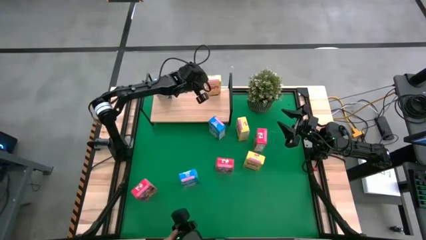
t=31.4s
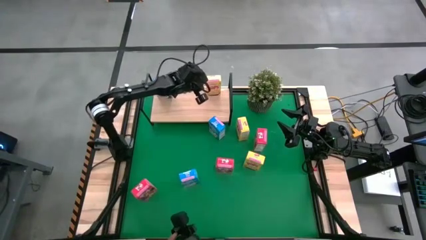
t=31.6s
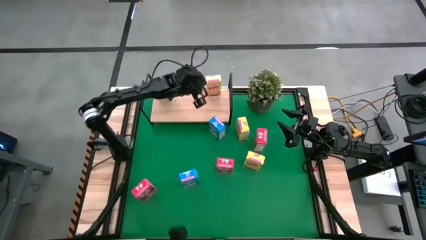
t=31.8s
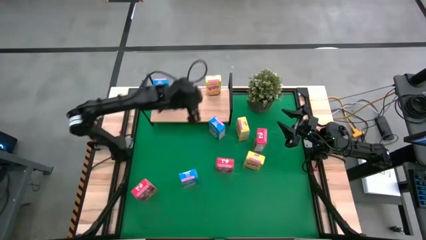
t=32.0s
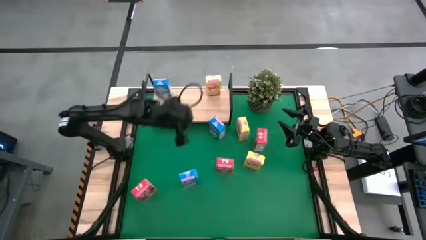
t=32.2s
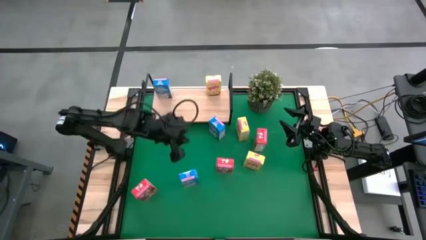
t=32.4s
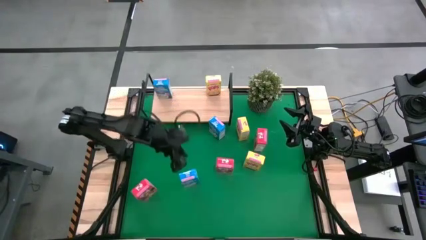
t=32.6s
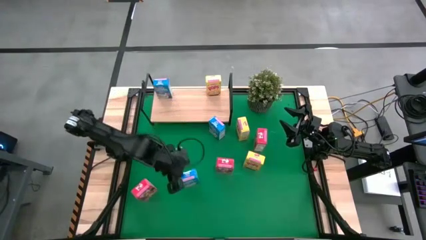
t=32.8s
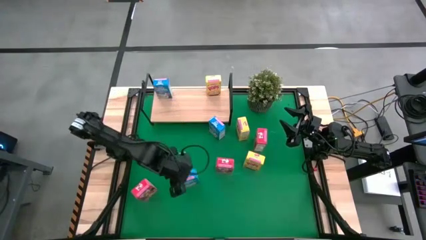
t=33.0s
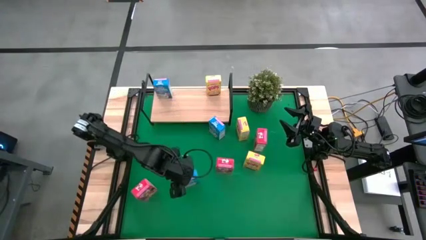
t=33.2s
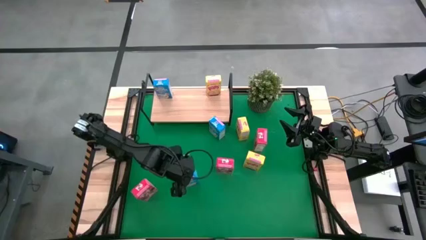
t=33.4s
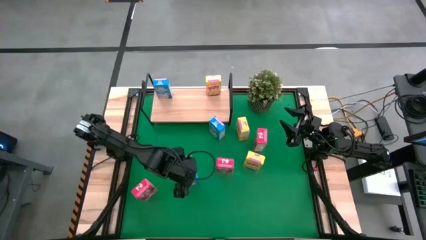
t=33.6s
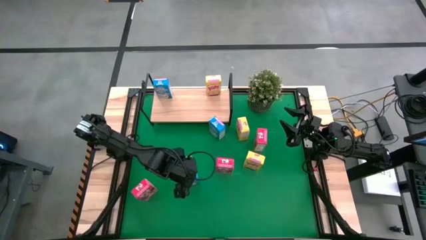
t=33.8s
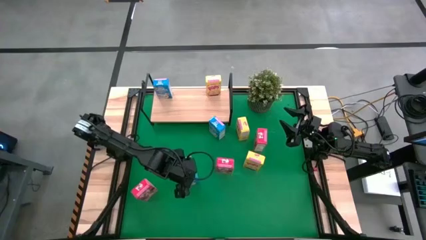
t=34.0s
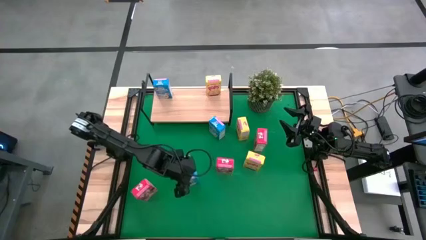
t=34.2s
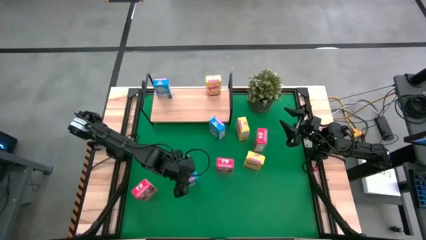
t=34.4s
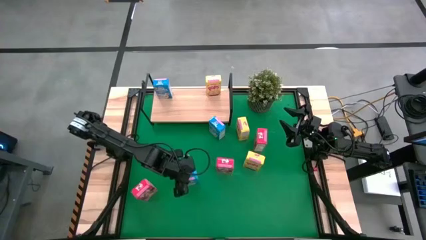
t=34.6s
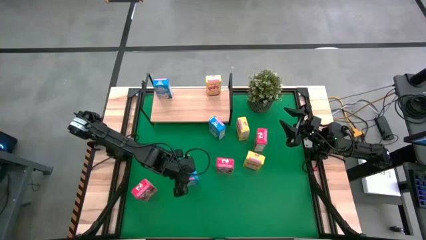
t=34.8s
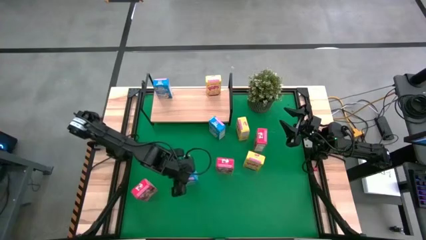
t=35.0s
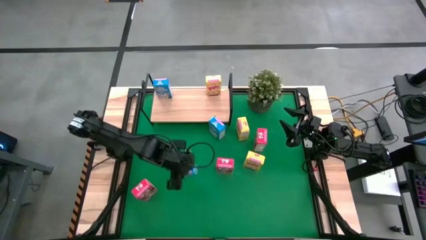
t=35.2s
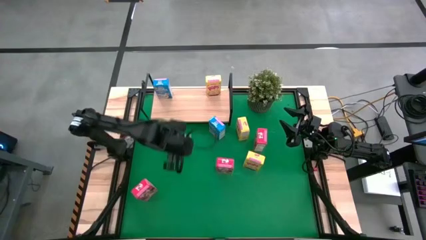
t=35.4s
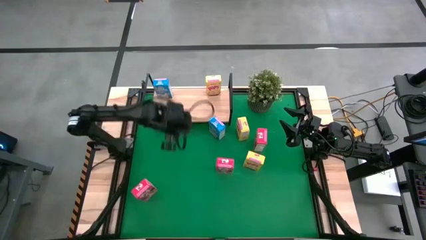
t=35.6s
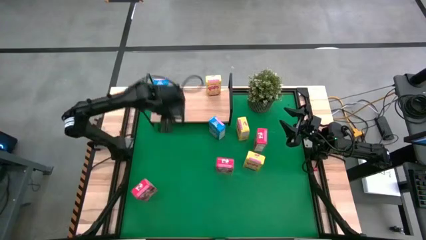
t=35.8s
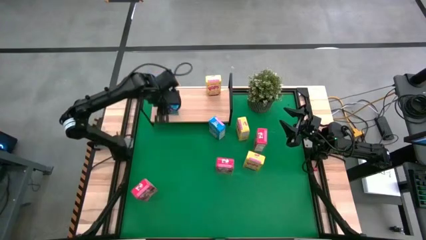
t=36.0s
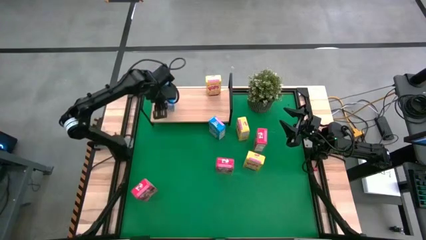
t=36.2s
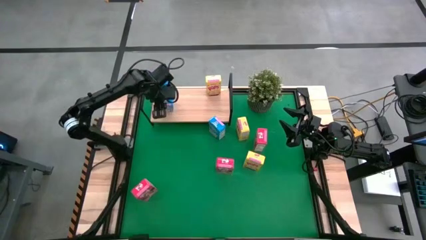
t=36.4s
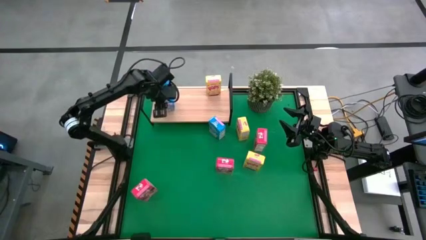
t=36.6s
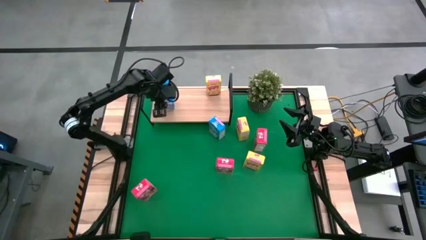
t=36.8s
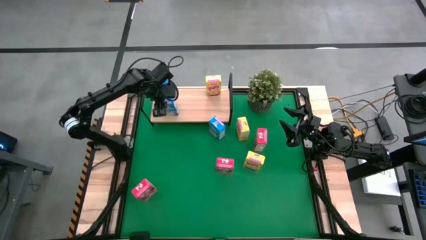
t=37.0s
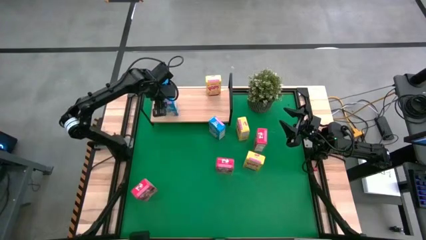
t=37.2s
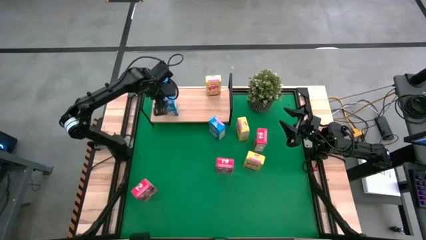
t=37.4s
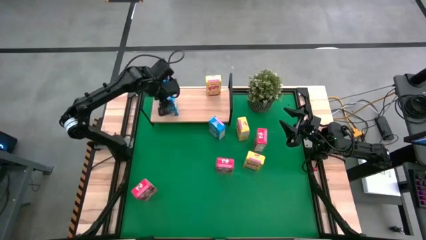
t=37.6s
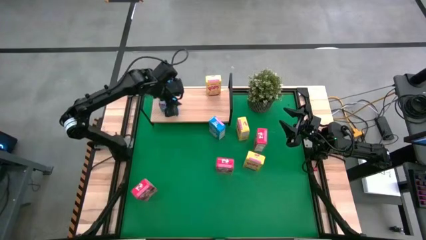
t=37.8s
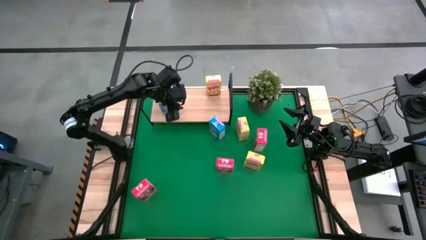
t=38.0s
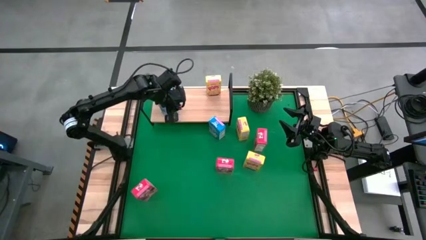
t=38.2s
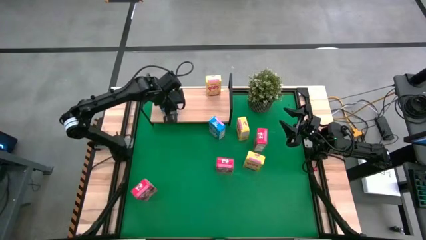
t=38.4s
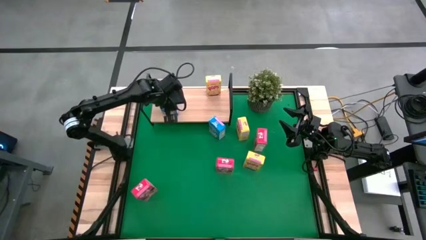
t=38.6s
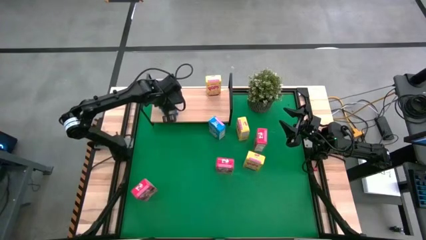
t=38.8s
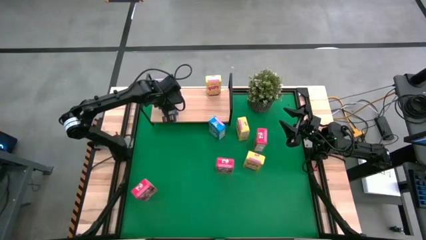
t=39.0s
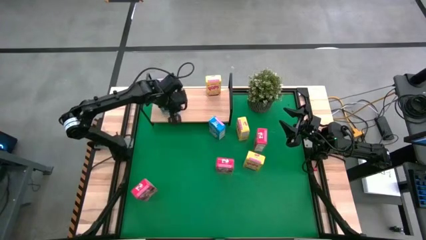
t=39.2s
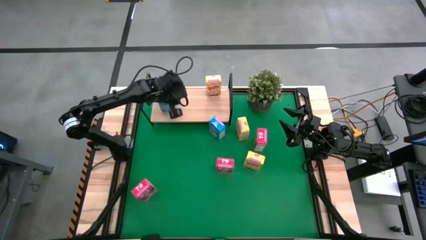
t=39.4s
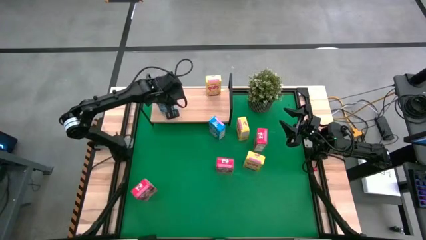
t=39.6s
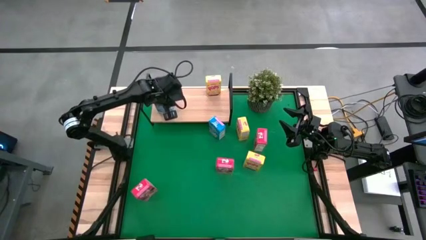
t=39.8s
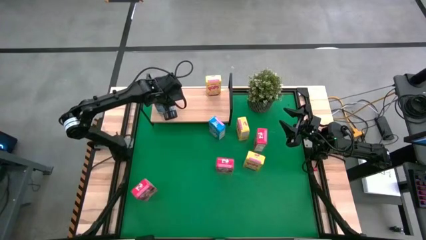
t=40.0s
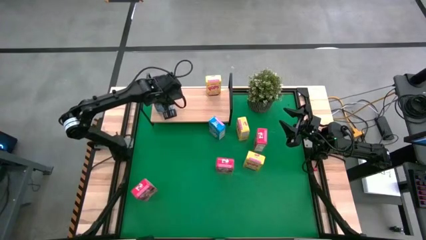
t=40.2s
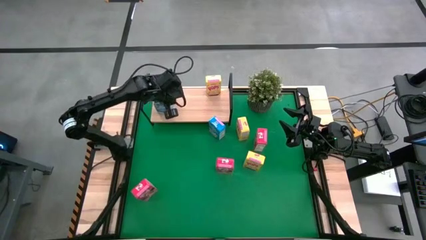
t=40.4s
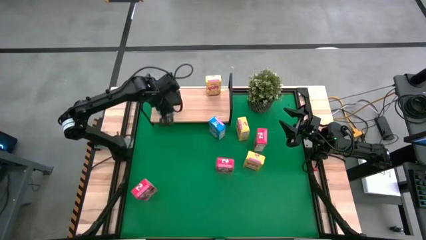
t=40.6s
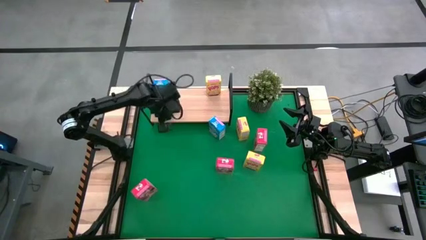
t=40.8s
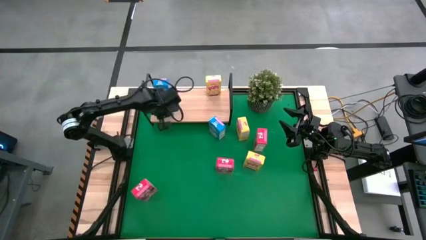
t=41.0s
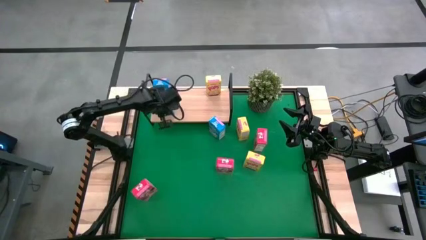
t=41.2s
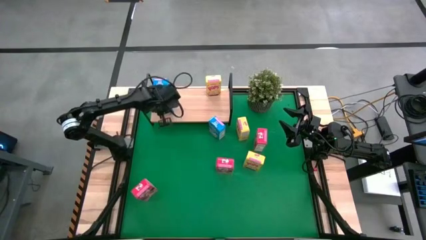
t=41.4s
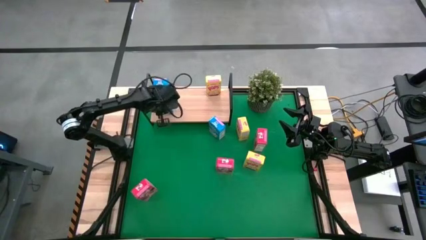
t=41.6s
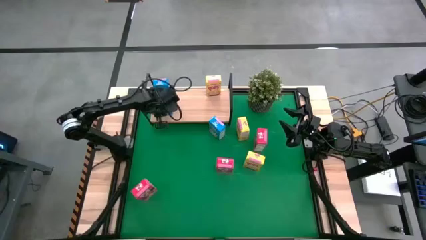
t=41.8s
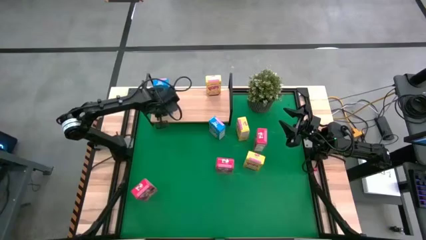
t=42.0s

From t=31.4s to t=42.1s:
Task: Stack cereal on shelf
Put the bottom blue cereal box aligned with the other blue cereal box on the shelf

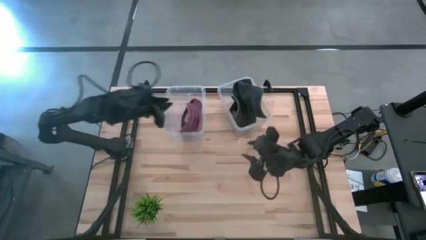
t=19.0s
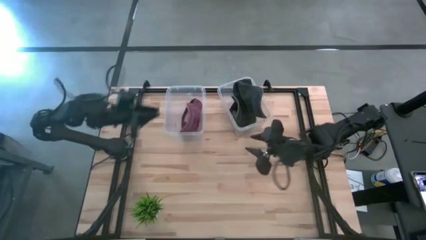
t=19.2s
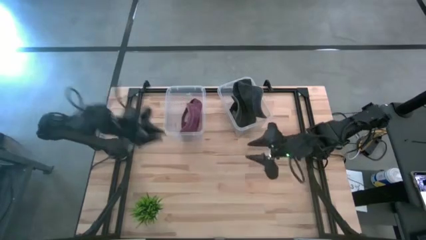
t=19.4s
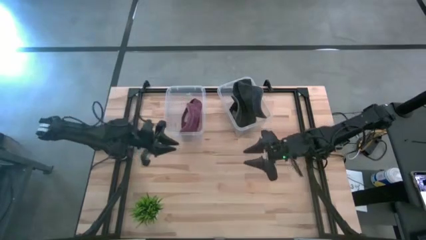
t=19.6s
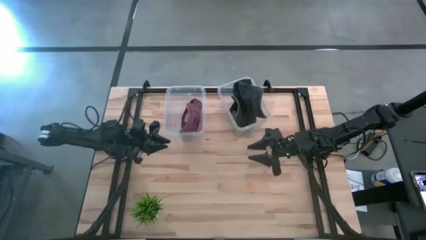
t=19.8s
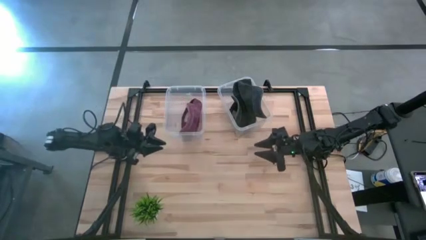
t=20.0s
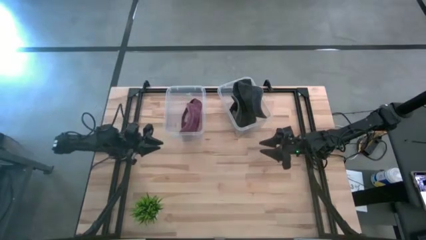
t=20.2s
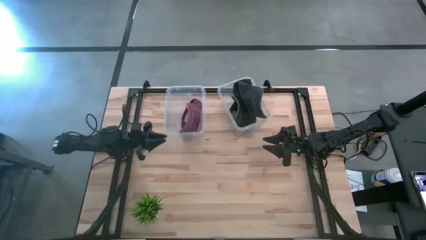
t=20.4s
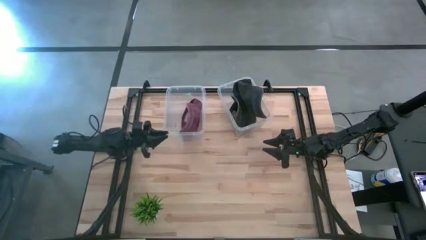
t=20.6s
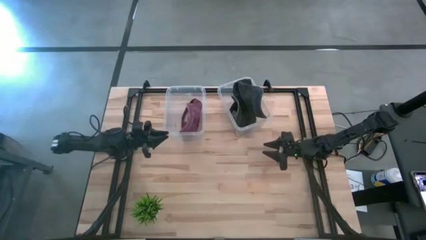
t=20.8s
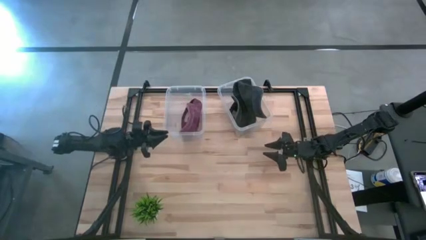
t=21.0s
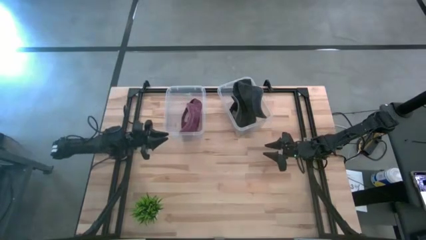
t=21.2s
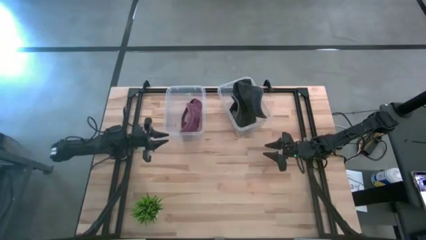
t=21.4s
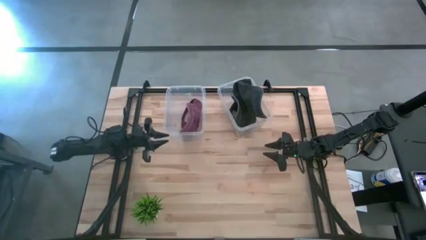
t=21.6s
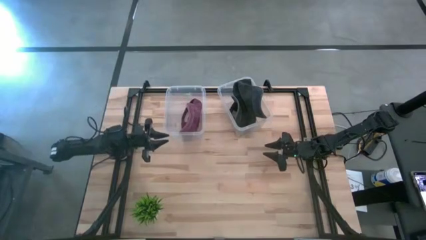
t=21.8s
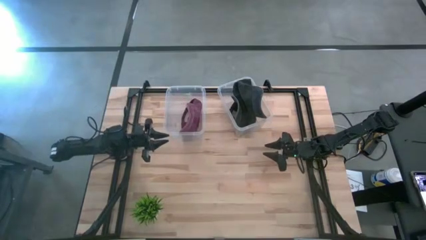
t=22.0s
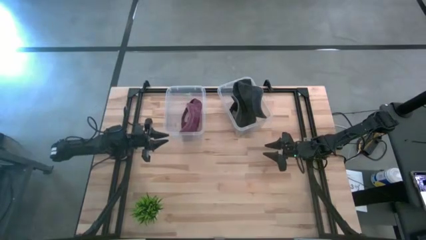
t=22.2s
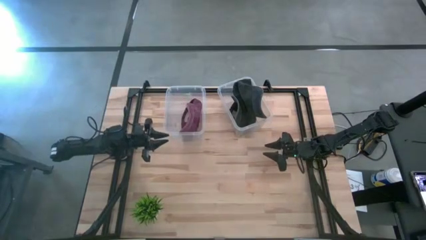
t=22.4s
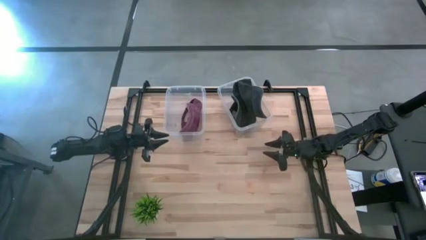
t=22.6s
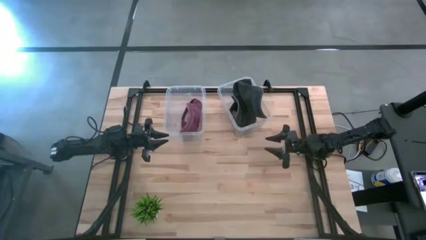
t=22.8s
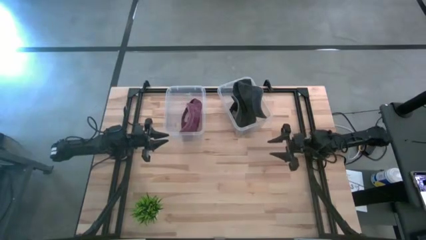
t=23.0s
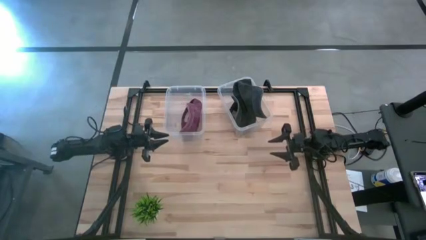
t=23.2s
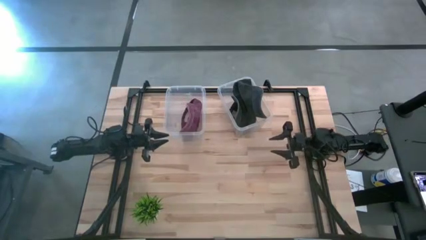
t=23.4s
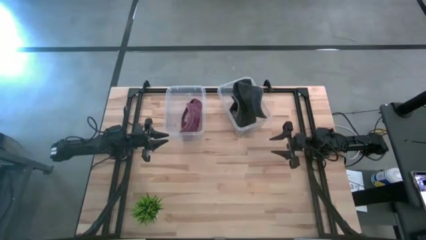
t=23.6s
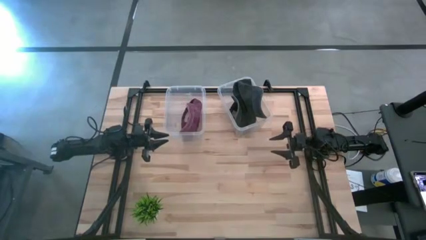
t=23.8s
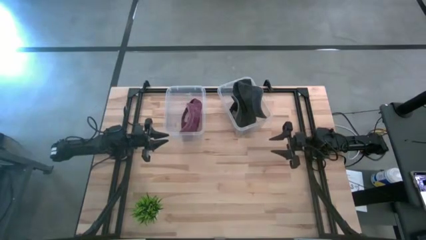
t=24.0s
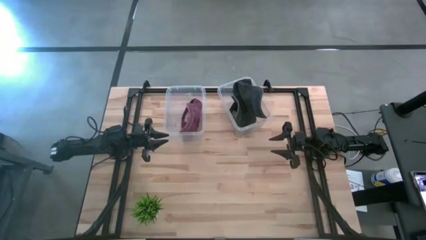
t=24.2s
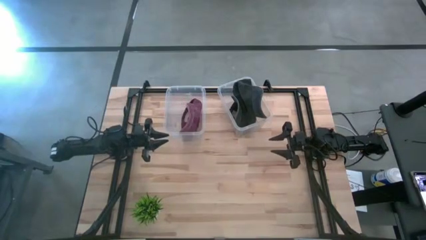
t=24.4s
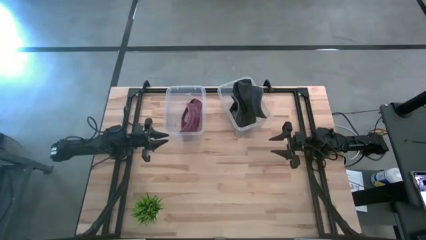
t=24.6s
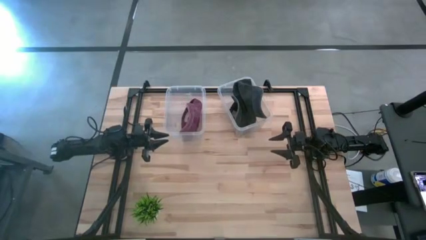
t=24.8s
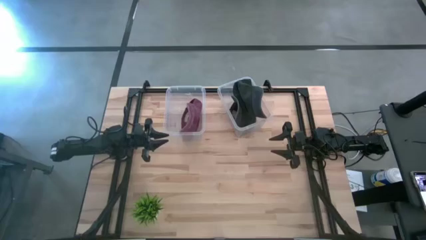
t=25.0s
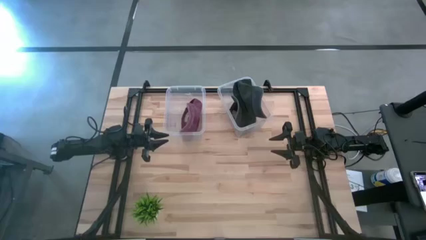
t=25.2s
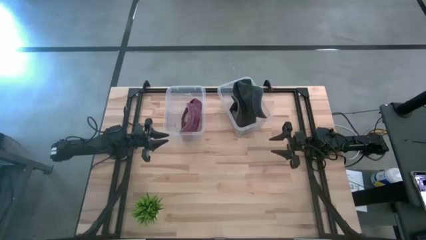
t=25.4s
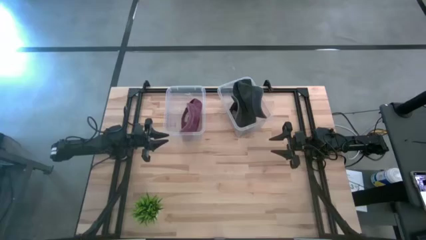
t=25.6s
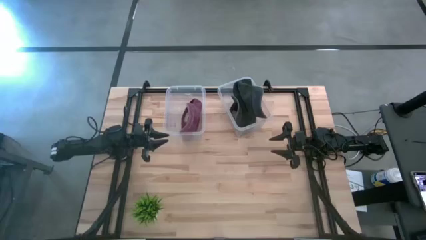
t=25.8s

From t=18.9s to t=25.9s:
Task: Pick & Place hat
Return to Home Position
